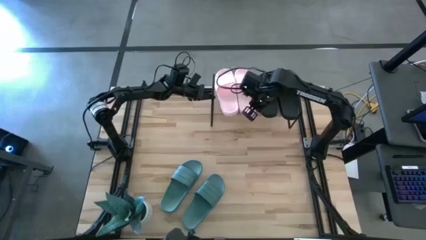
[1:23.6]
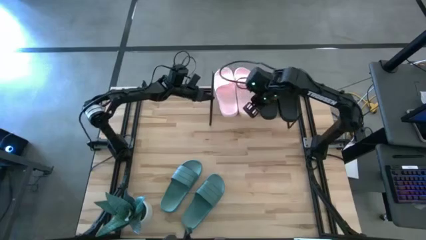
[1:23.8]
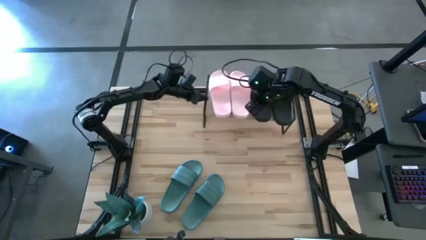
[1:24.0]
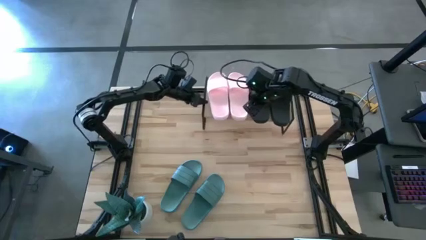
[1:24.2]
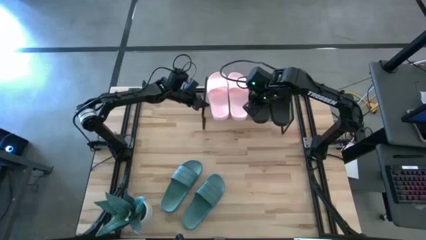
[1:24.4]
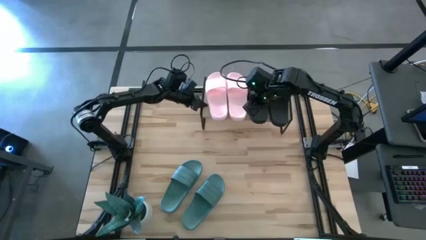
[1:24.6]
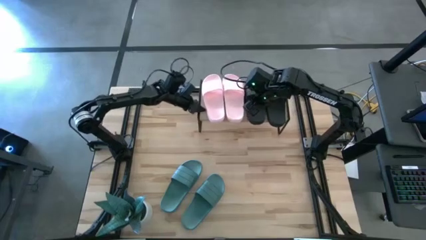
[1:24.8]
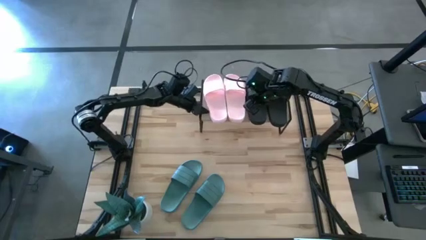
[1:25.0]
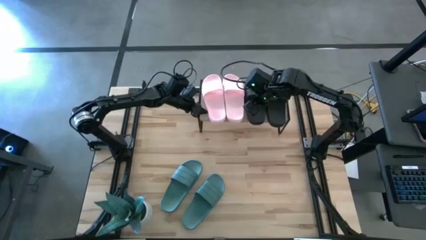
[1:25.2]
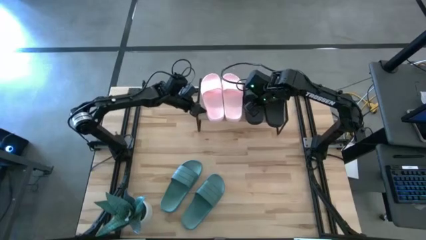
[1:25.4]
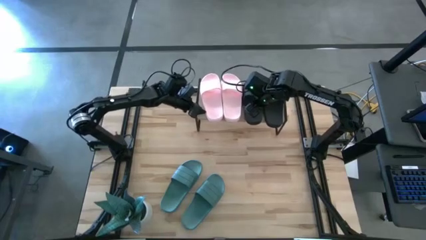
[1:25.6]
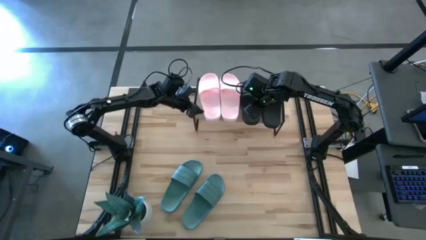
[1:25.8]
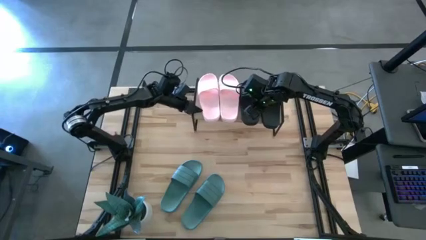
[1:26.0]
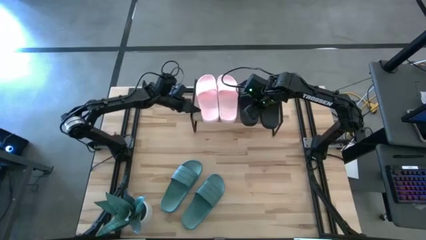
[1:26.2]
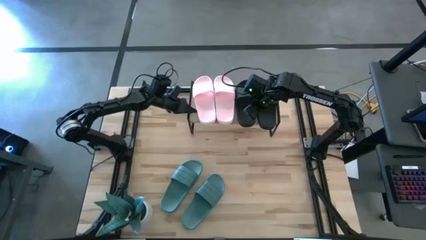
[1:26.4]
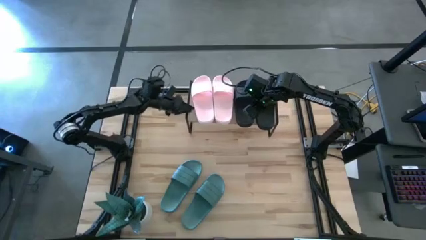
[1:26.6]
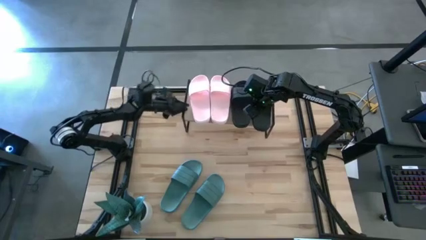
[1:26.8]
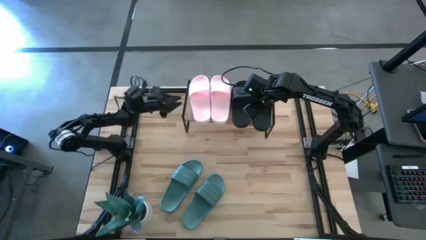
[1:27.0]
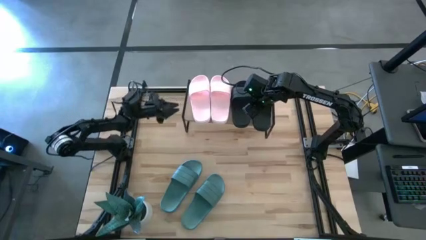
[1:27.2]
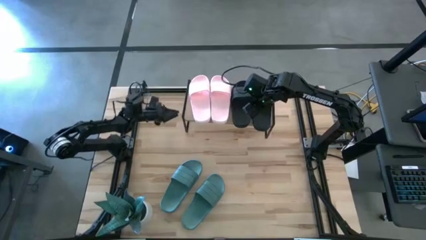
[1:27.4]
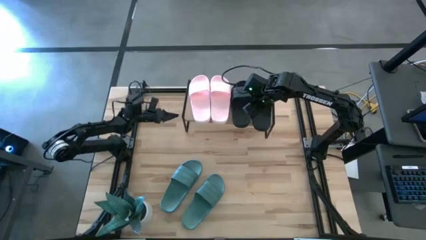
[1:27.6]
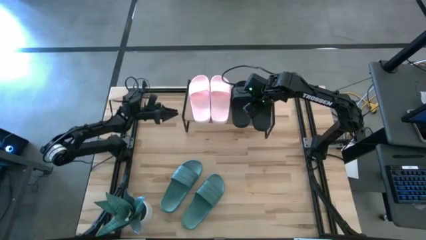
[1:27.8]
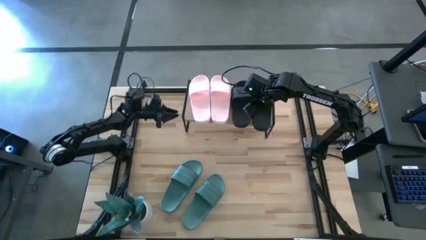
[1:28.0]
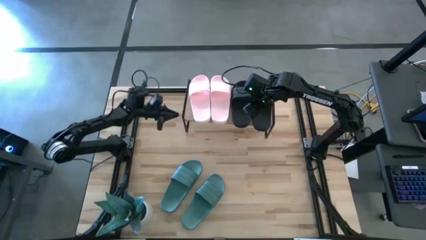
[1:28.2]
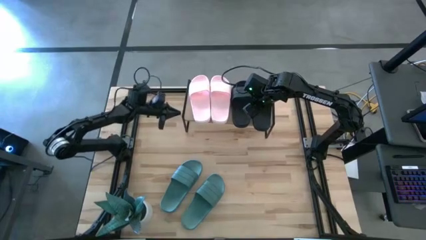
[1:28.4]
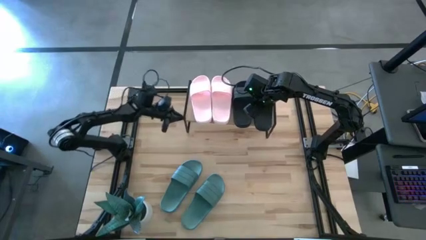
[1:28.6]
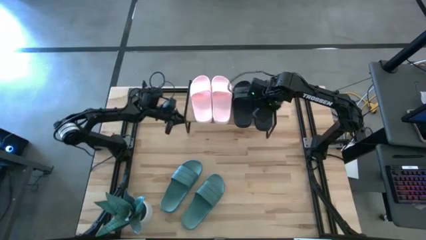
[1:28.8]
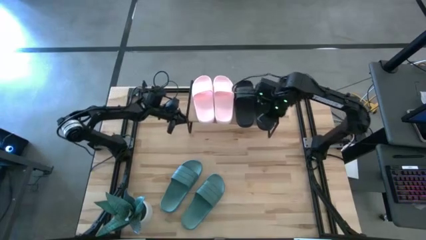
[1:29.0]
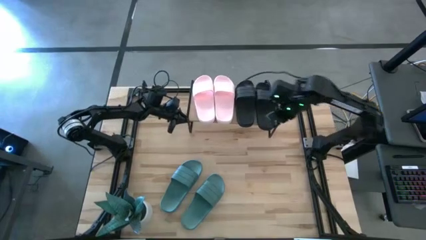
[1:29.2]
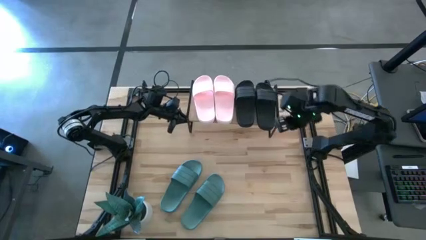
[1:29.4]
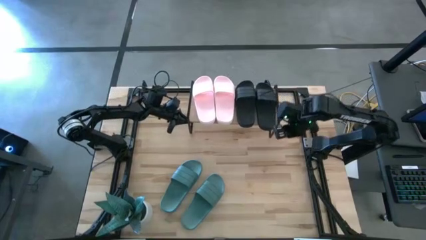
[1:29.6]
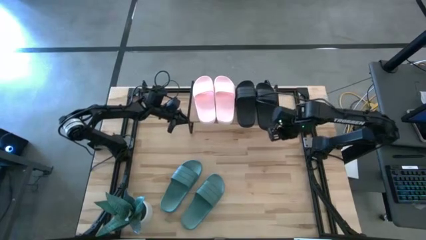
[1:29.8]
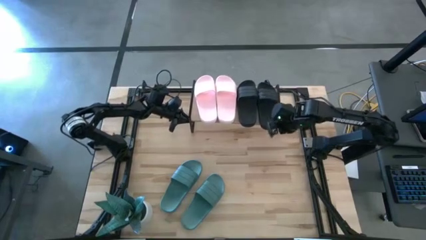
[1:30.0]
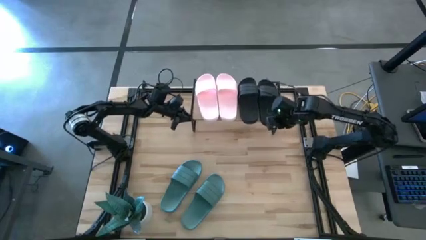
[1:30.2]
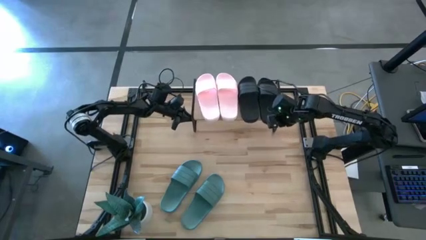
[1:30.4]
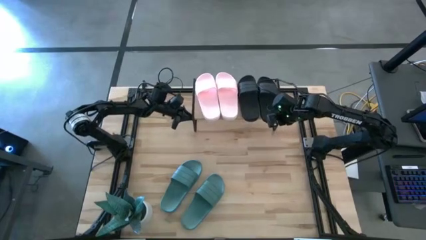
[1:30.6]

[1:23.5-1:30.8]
Task: Pick and place slides into the shelf
Adjust the shelf

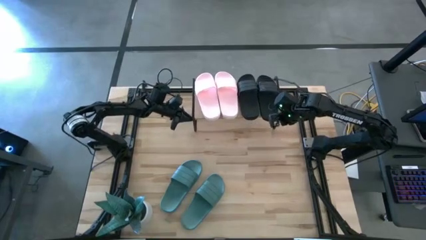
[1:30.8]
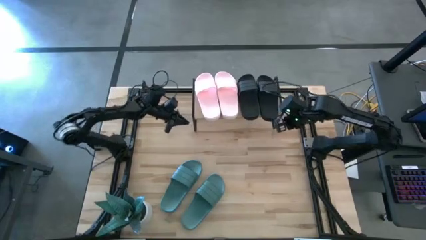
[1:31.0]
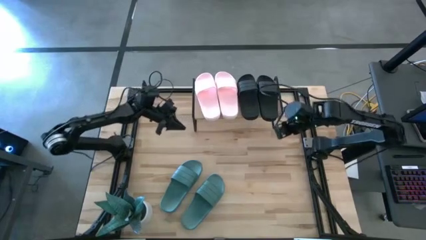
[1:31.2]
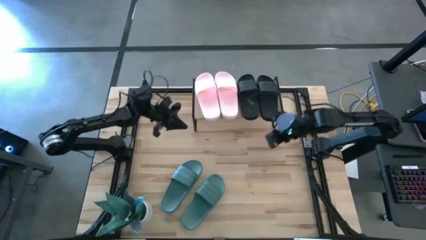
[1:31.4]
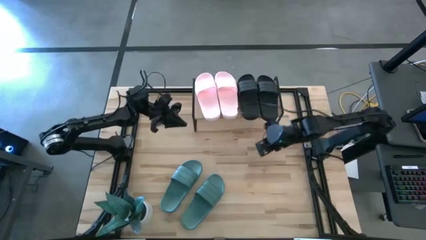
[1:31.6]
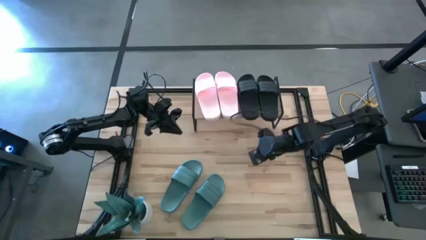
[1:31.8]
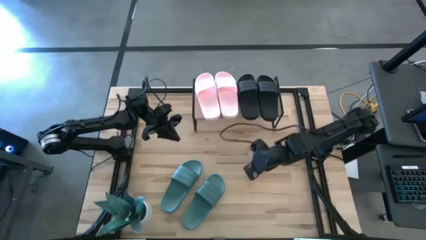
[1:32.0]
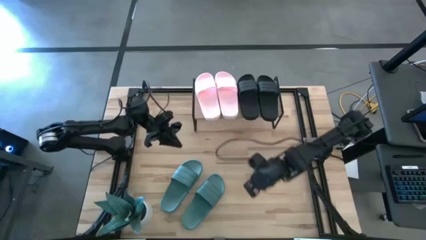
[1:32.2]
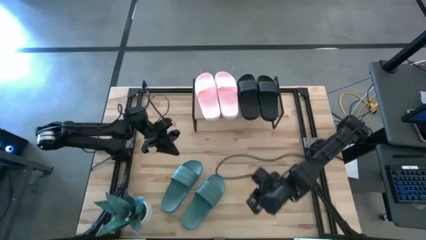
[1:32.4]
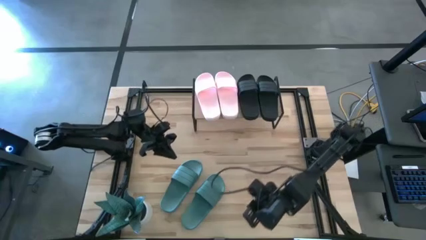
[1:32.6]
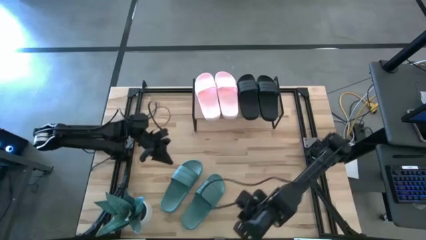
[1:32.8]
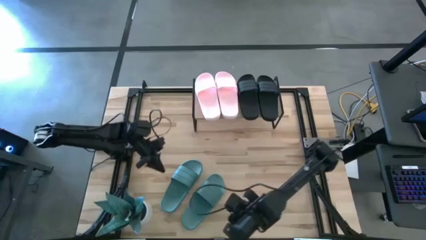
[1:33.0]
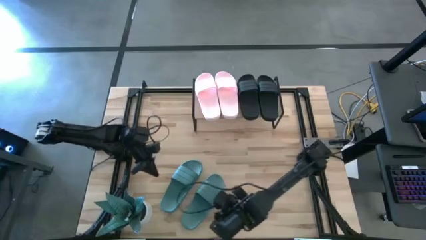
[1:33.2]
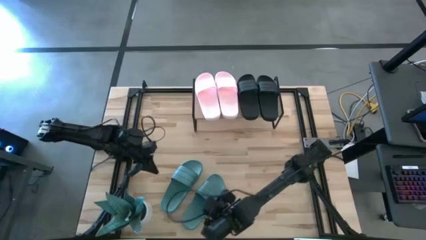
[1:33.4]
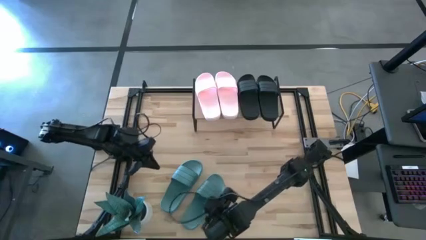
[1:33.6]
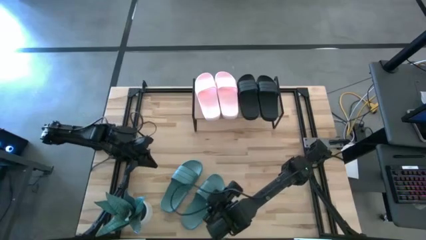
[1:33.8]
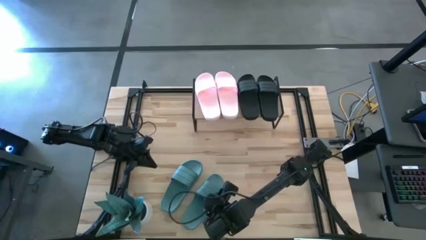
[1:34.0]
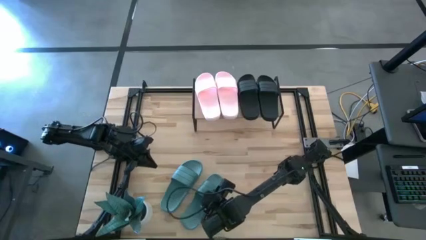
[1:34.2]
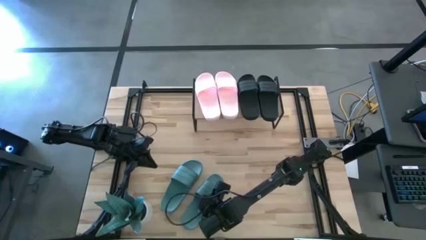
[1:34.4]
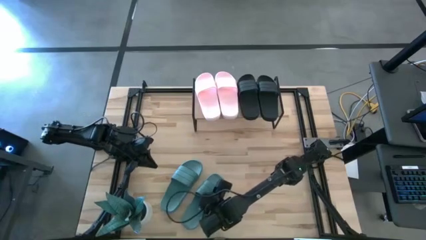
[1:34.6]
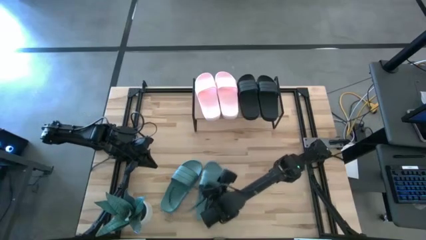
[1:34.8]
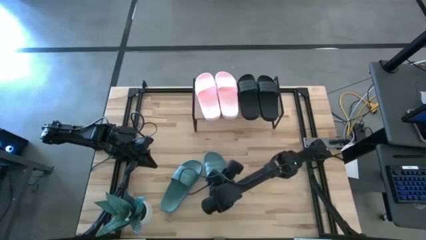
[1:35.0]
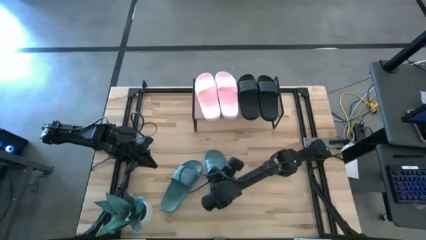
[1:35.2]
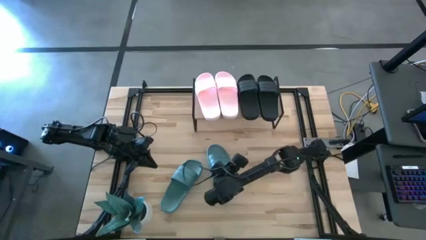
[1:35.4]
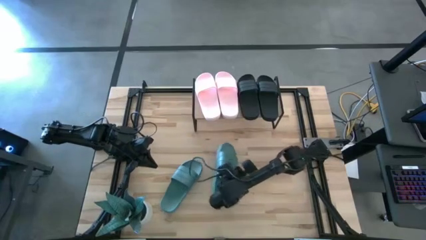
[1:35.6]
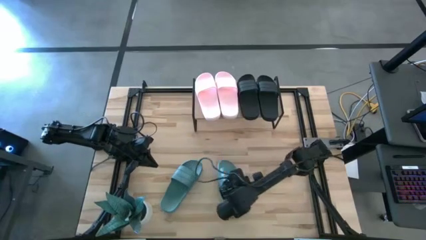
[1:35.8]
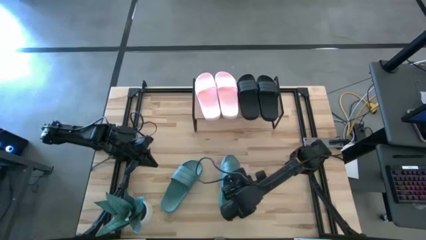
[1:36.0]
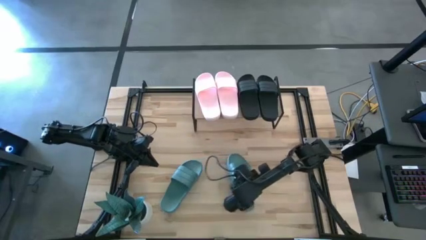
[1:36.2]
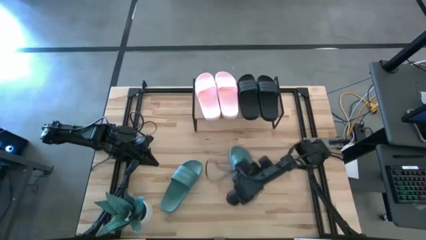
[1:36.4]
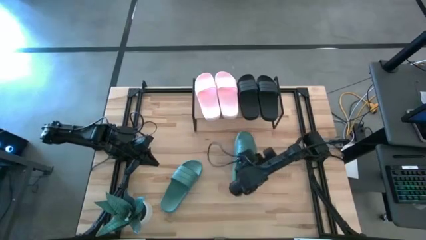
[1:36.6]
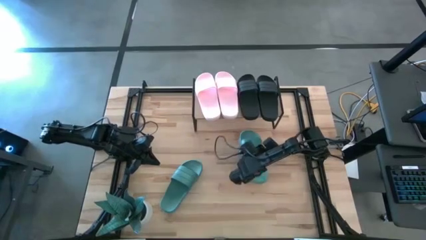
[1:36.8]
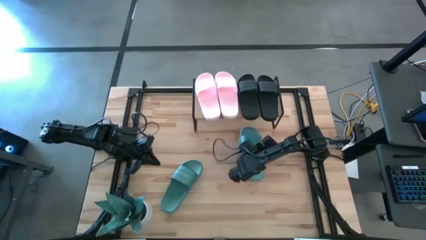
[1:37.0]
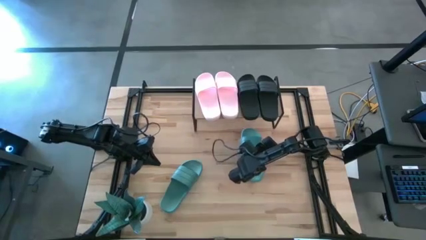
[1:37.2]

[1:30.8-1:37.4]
Move the right green slipper to the center of the table
